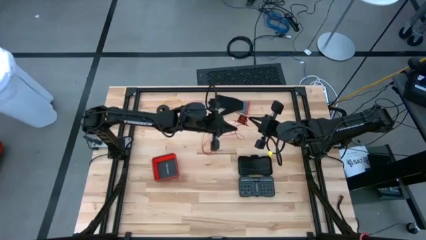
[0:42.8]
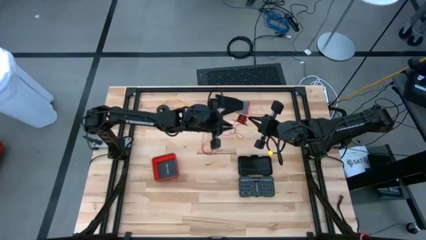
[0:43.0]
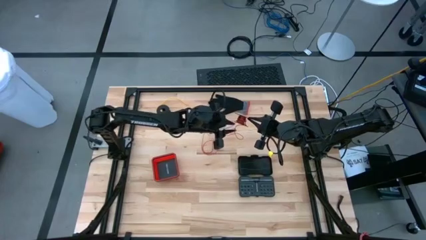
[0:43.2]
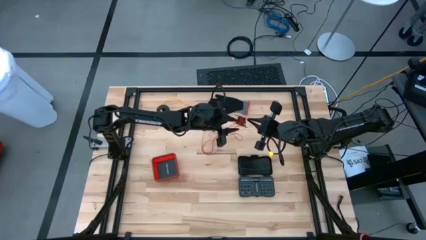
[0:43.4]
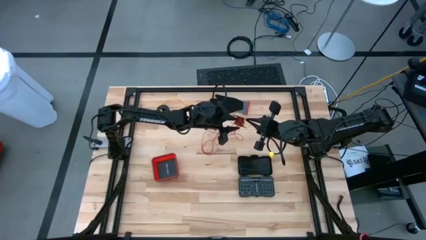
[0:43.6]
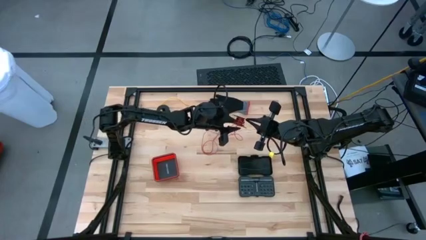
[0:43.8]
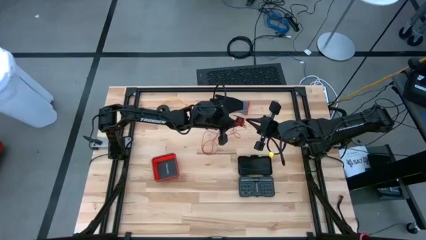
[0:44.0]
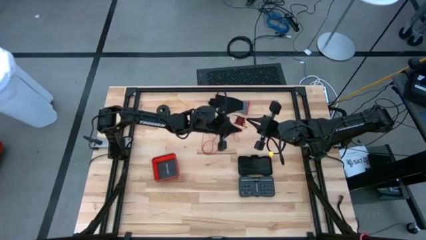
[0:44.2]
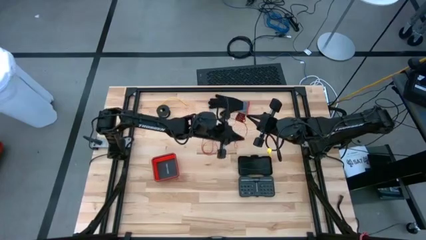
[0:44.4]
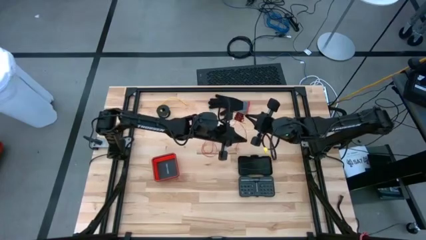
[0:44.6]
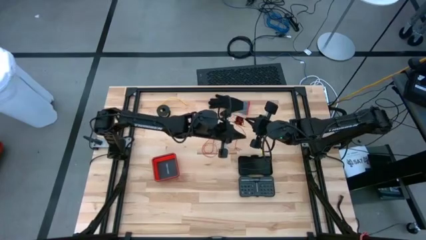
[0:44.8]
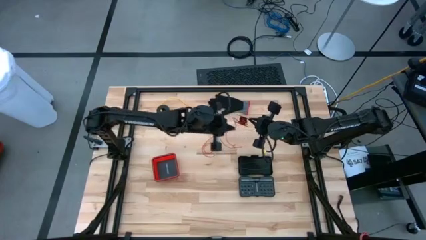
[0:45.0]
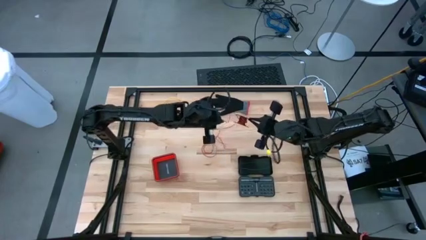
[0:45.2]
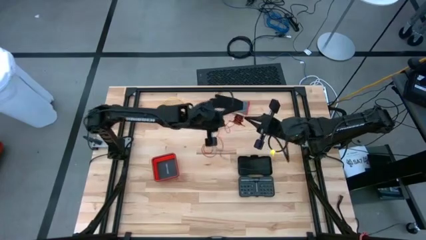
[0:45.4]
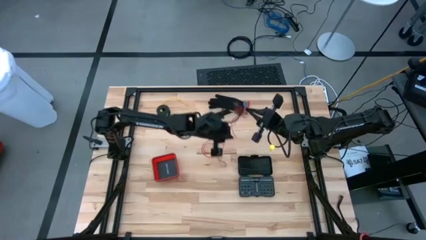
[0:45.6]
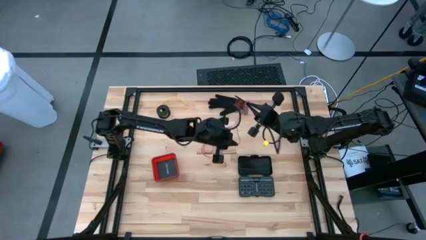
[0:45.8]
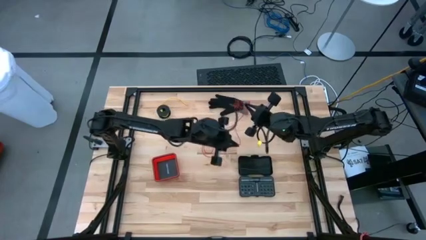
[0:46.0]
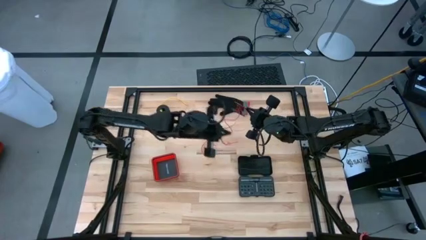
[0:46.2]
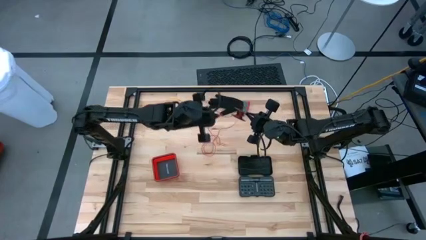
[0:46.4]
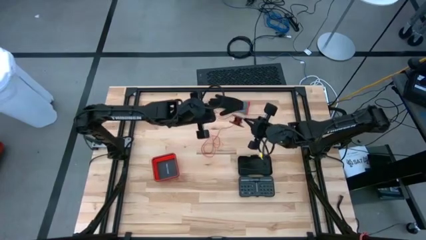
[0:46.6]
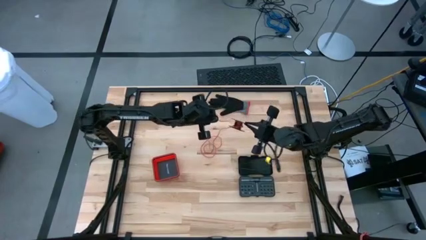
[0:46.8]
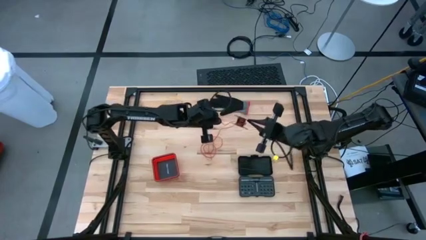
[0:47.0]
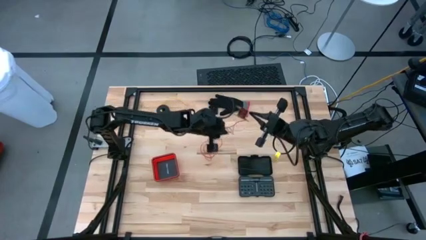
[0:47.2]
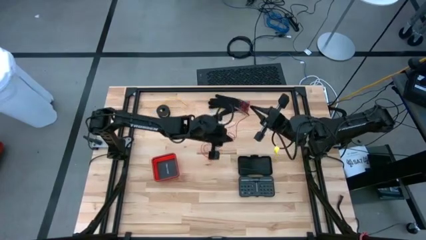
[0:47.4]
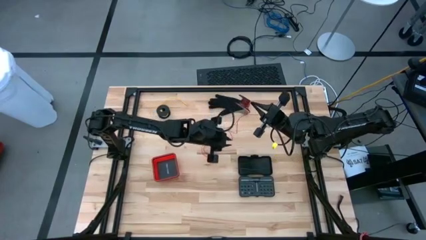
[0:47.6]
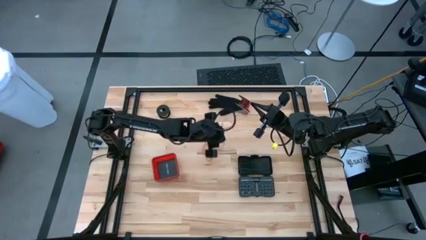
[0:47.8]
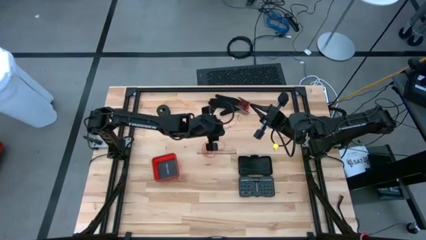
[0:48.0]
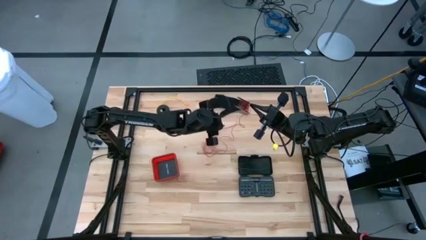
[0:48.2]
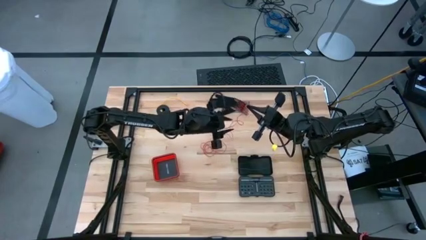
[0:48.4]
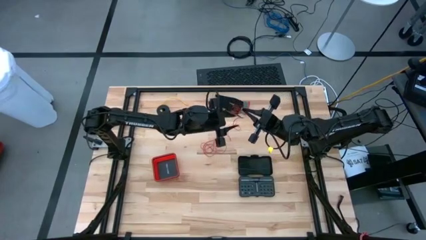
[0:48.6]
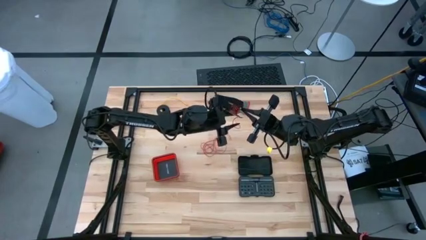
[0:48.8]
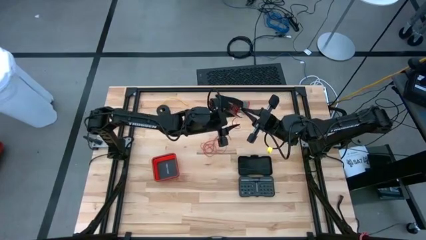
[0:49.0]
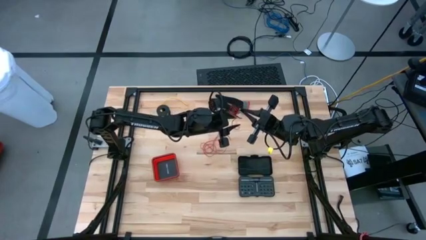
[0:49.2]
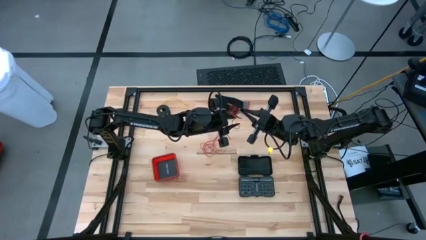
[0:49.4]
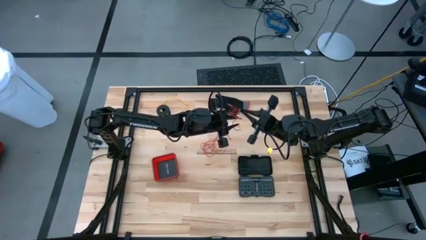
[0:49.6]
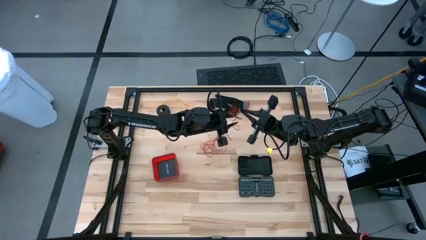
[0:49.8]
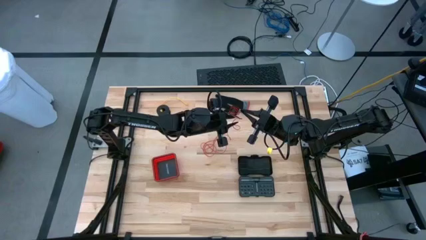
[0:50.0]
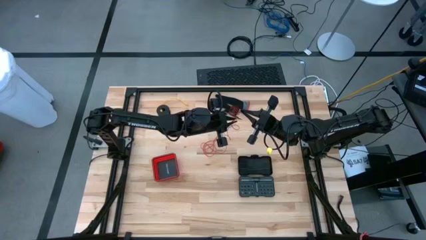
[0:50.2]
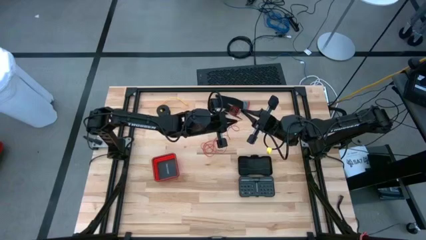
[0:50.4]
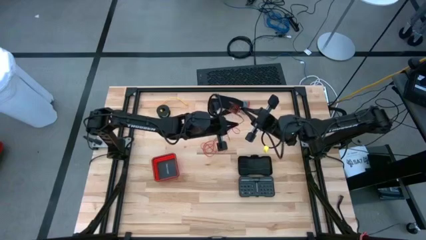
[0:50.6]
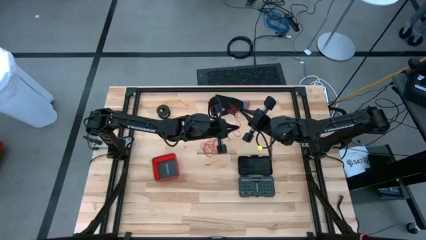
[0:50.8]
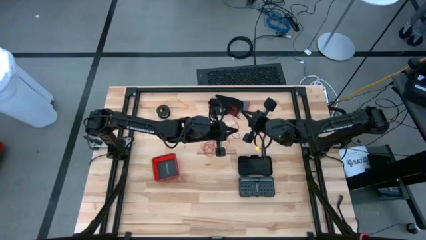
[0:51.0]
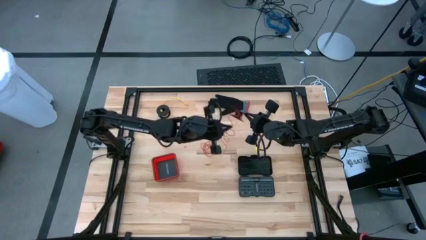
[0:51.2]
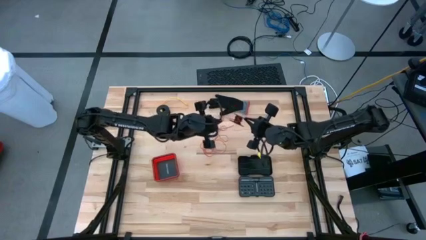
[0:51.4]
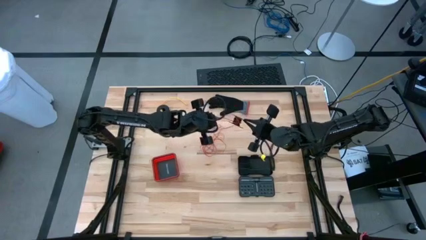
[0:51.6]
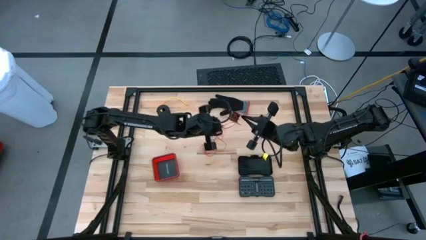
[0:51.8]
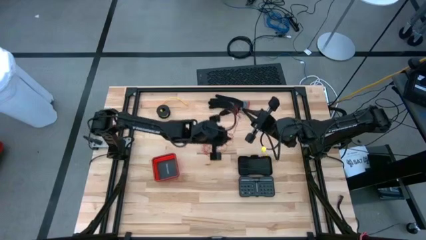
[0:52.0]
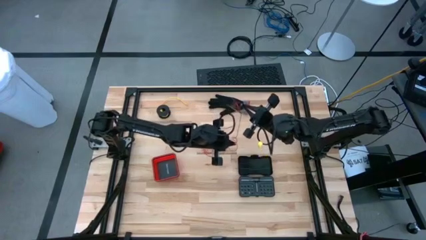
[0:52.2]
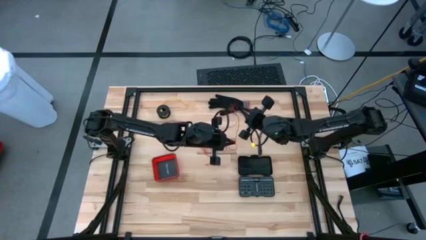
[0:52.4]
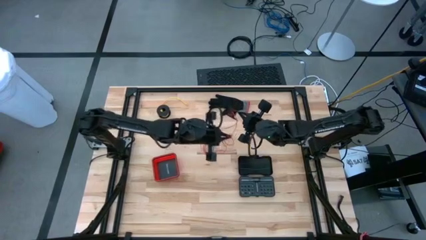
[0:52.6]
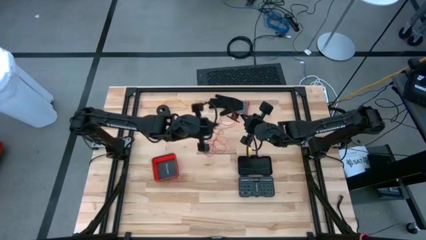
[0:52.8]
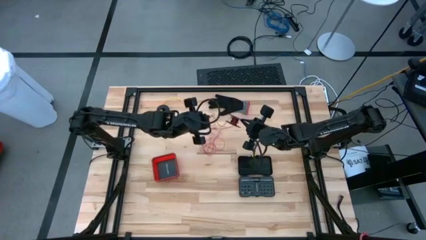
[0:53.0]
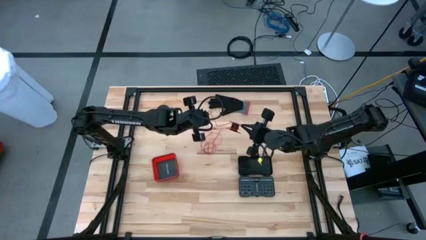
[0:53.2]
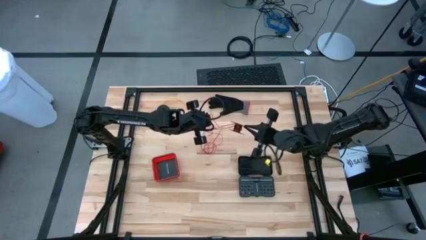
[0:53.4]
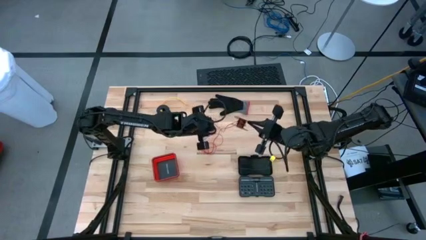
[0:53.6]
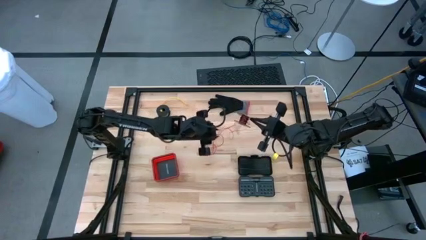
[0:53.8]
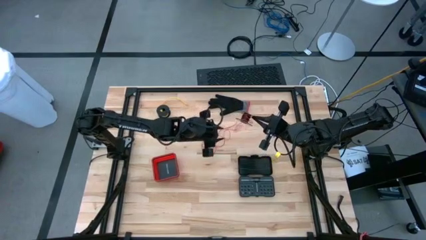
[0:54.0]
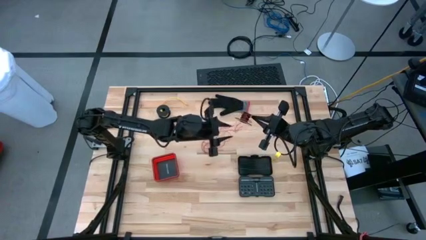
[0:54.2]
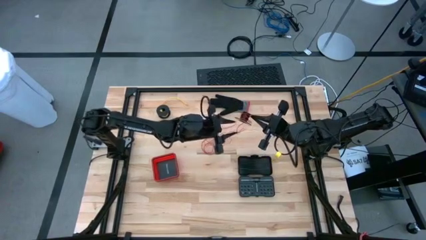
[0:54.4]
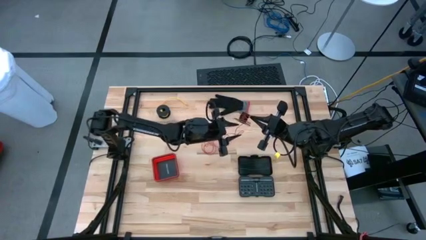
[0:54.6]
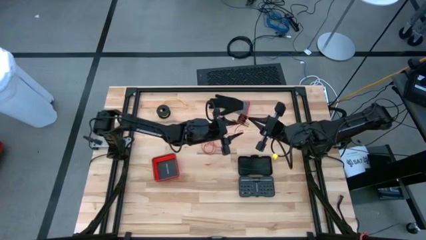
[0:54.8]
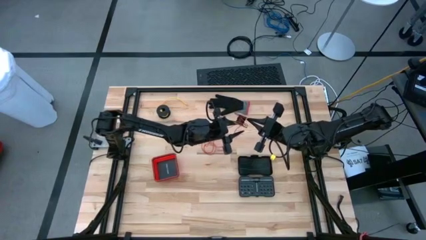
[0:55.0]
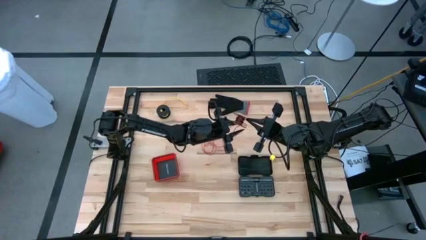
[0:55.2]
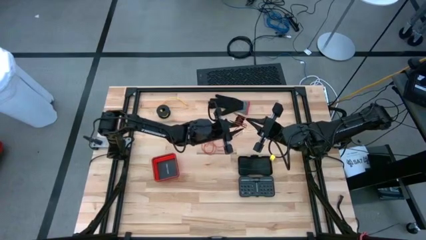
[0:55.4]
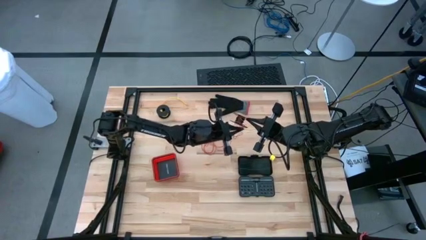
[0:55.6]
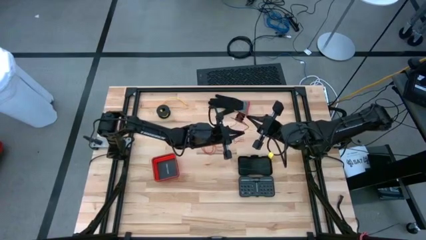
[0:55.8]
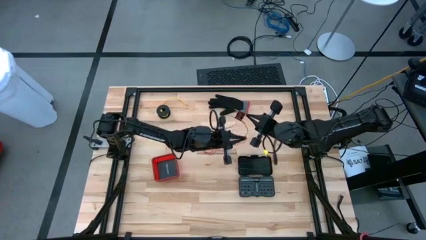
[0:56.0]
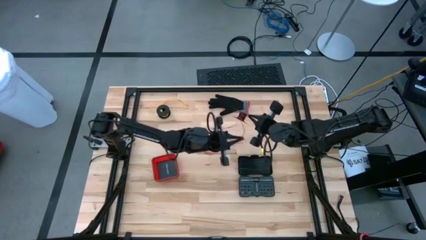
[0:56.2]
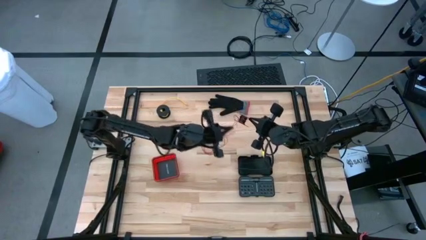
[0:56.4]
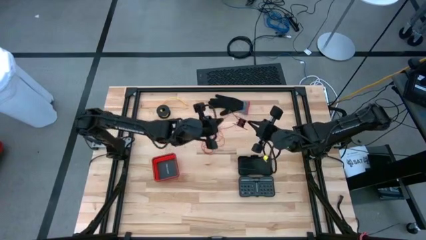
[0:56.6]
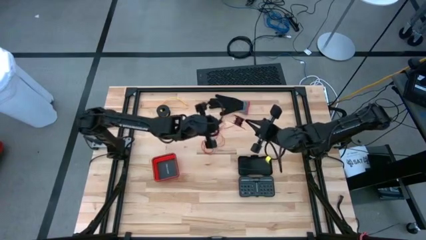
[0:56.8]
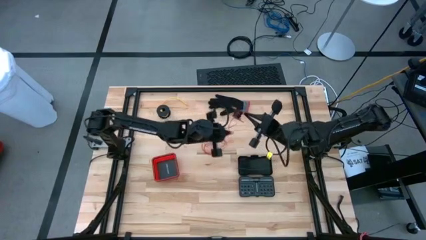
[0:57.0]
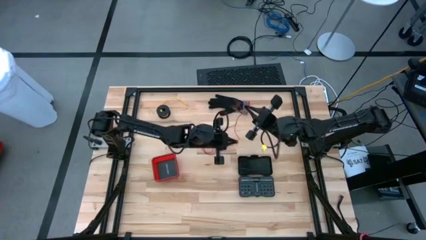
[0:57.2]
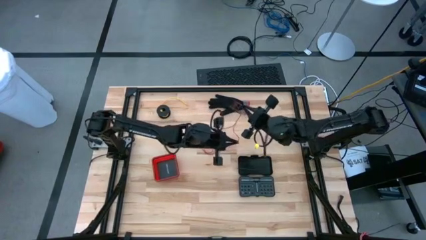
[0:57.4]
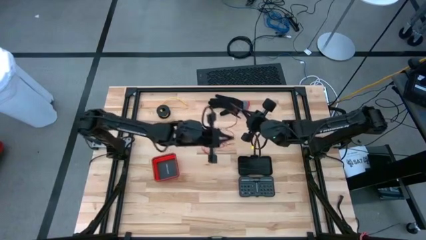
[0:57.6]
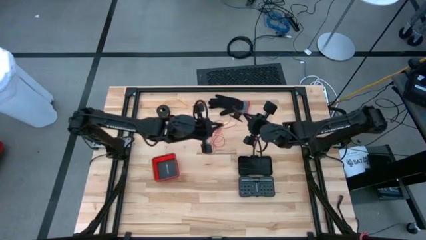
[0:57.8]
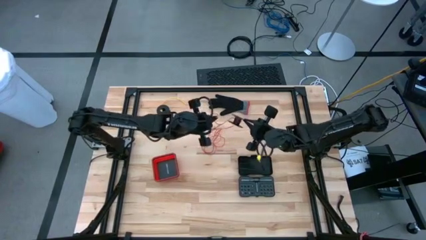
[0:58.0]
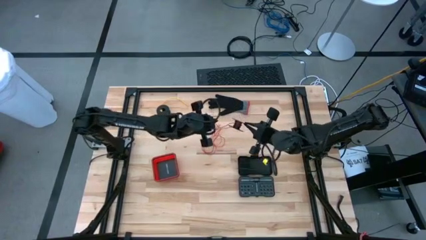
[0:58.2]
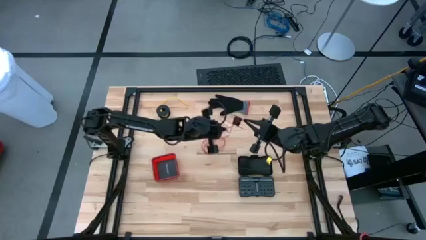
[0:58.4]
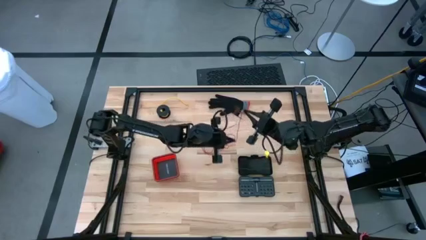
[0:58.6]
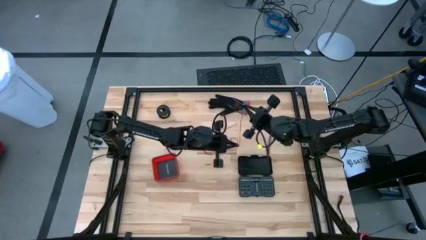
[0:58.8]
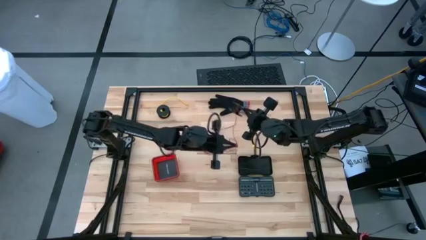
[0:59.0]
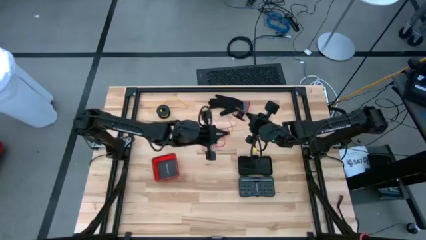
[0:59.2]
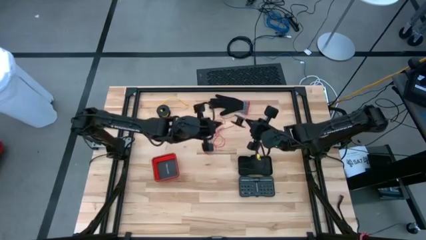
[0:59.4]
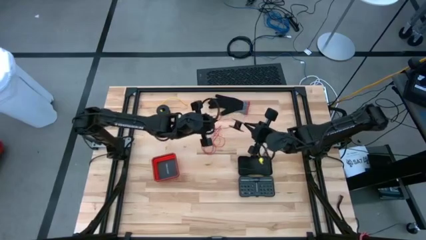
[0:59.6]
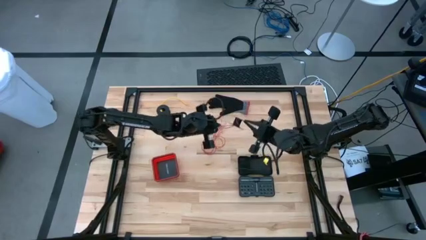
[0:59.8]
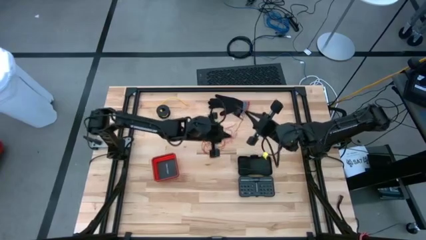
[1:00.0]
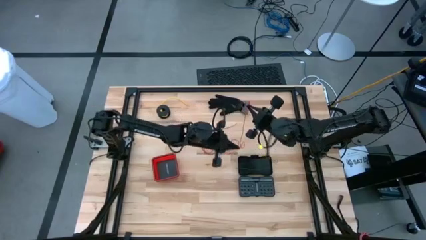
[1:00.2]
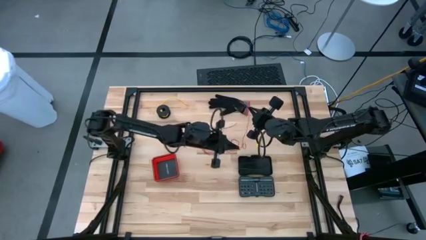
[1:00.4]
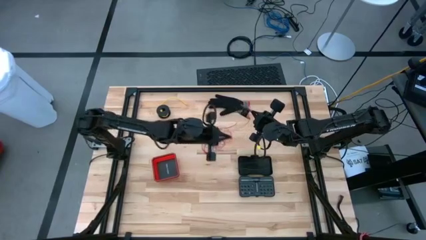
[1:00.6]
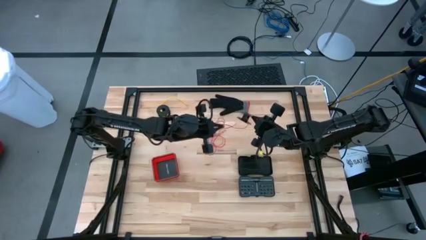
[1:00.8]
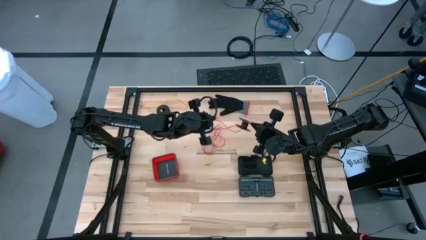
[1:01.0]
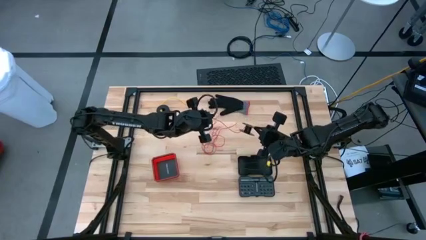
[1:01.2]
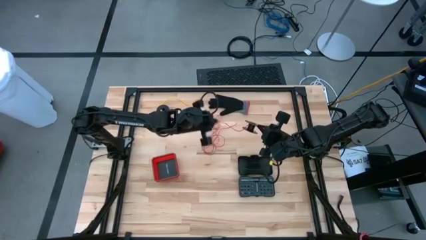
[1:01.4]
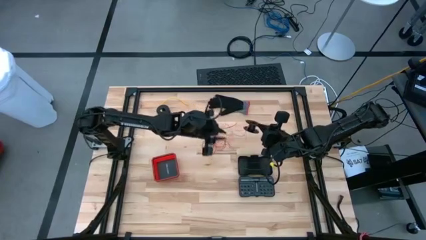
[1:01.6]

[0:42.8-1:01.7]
Task: Coil cords
Uncoil the red wire from the spool
